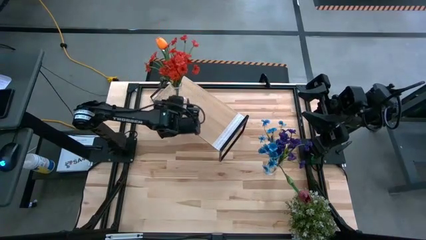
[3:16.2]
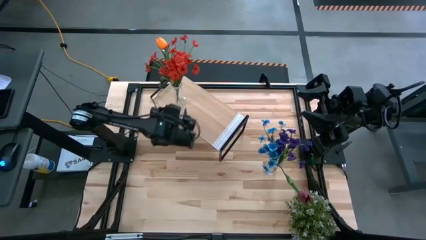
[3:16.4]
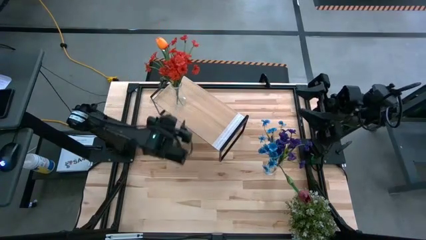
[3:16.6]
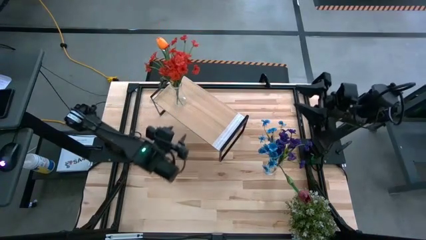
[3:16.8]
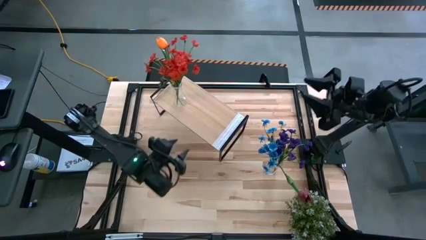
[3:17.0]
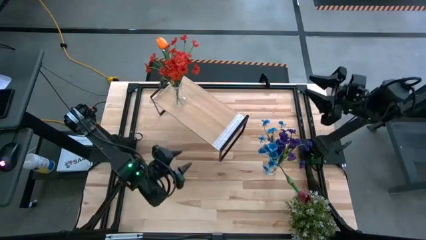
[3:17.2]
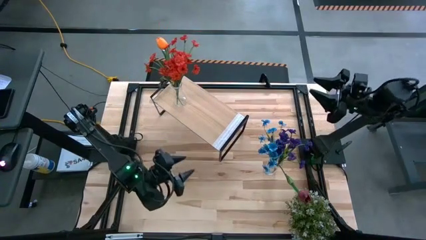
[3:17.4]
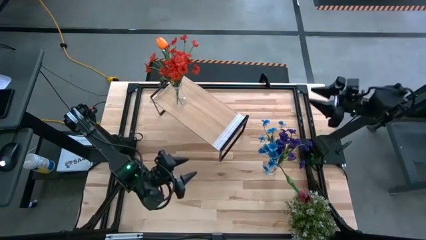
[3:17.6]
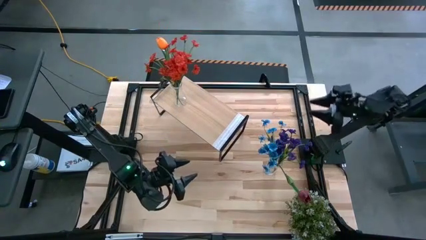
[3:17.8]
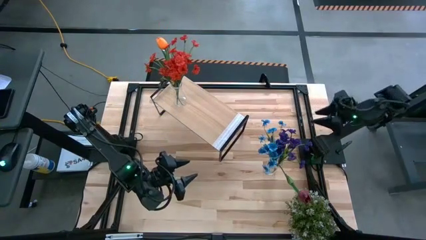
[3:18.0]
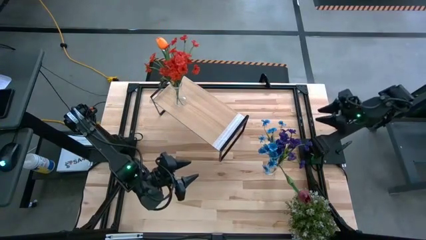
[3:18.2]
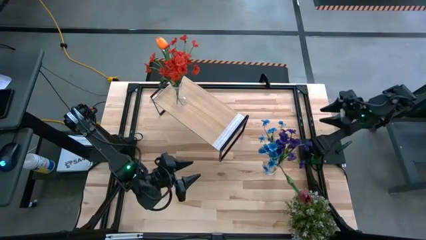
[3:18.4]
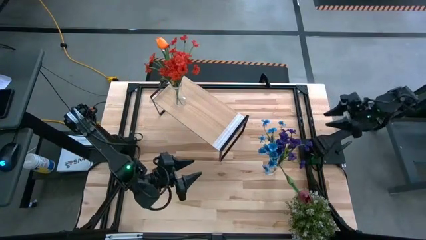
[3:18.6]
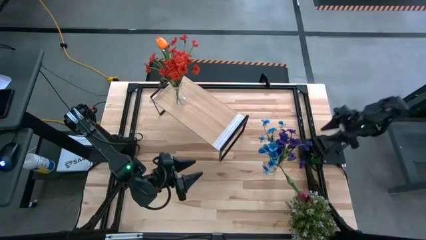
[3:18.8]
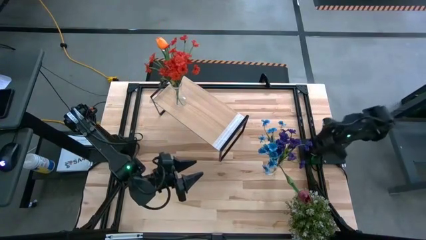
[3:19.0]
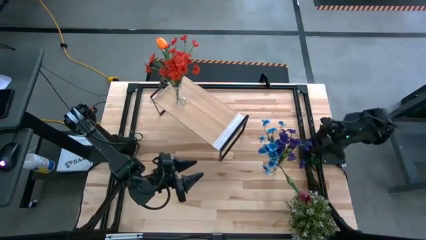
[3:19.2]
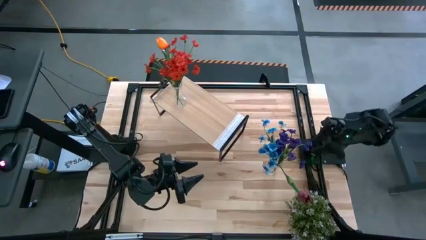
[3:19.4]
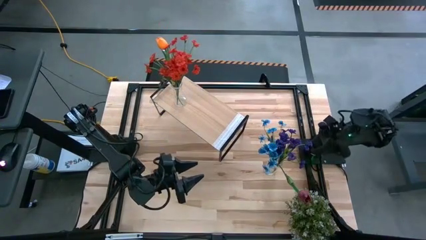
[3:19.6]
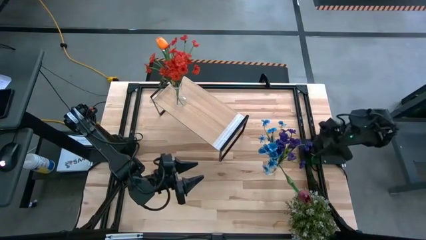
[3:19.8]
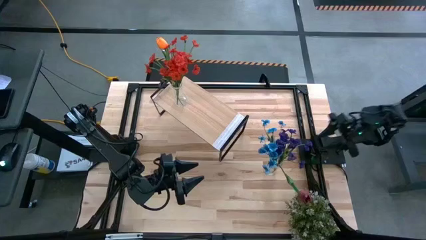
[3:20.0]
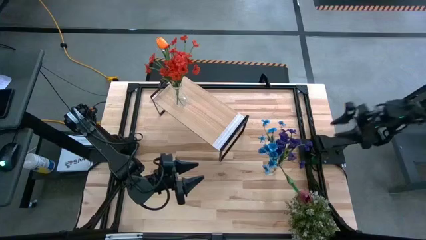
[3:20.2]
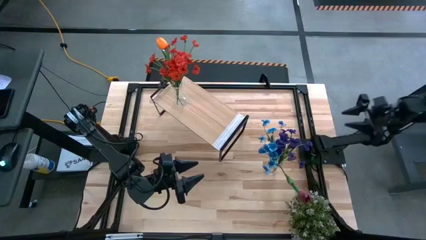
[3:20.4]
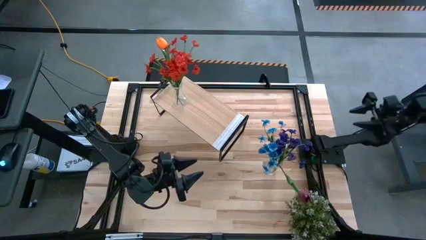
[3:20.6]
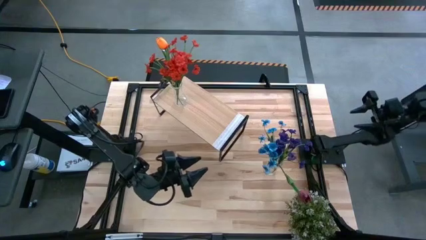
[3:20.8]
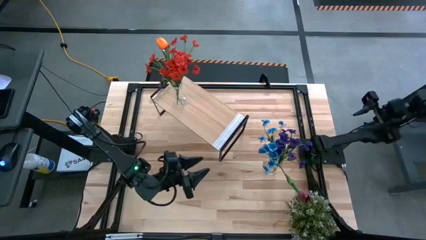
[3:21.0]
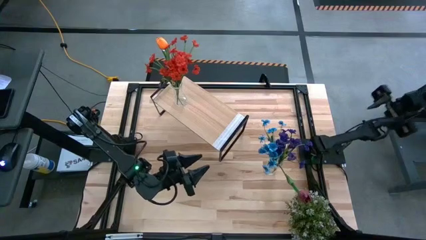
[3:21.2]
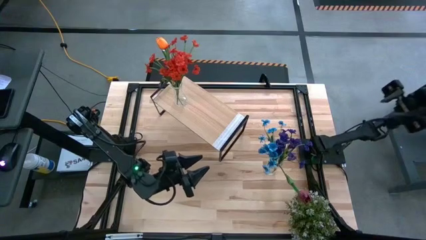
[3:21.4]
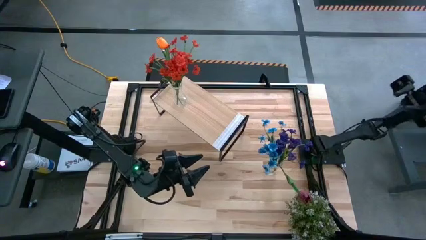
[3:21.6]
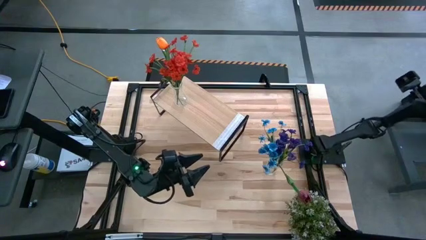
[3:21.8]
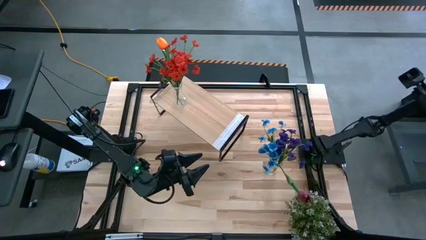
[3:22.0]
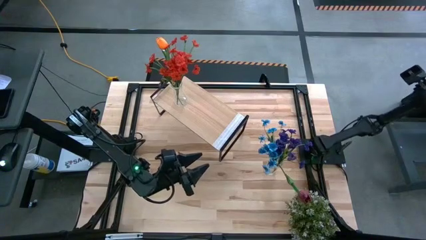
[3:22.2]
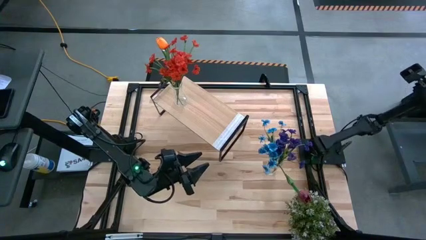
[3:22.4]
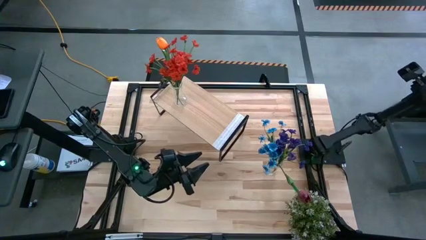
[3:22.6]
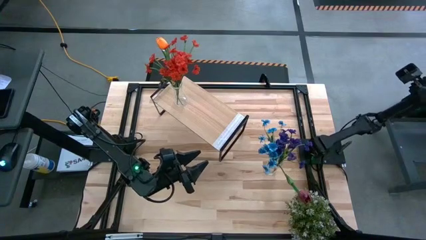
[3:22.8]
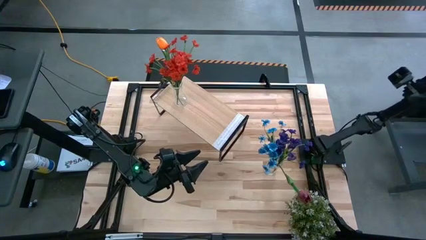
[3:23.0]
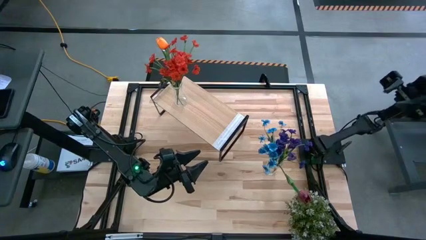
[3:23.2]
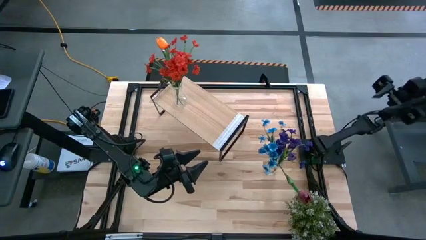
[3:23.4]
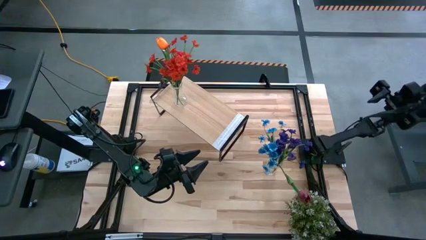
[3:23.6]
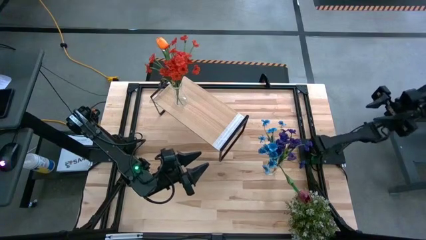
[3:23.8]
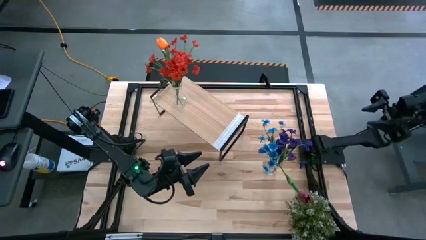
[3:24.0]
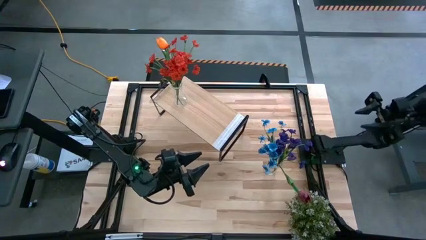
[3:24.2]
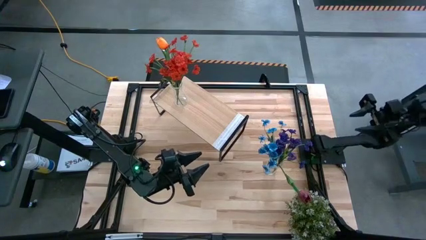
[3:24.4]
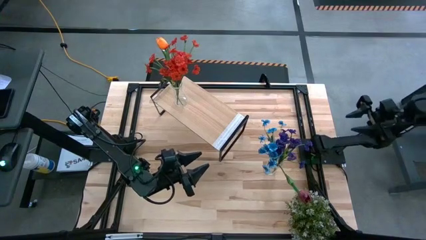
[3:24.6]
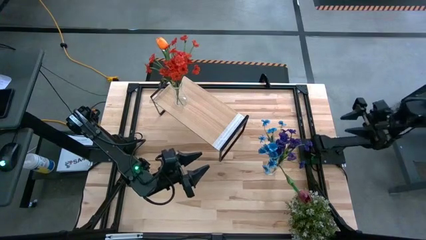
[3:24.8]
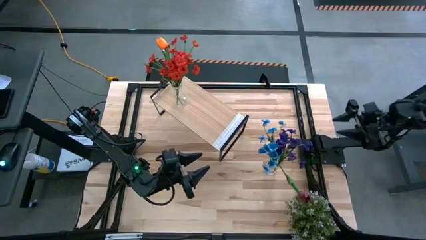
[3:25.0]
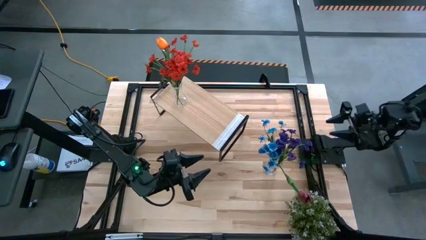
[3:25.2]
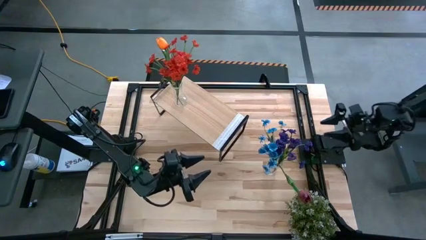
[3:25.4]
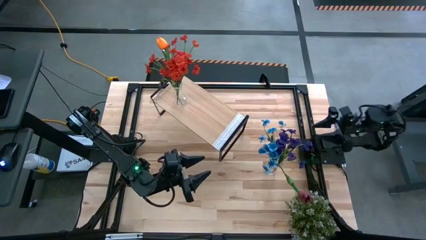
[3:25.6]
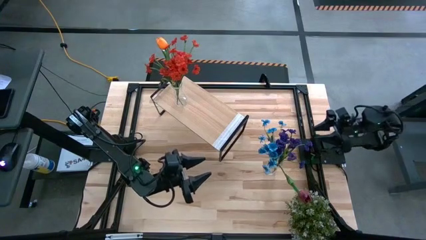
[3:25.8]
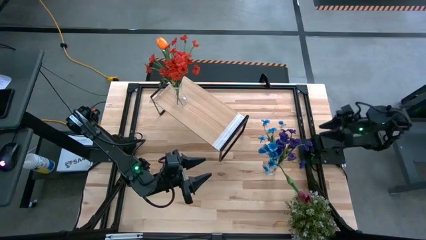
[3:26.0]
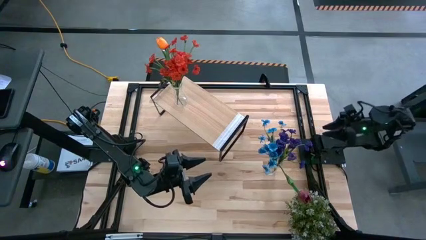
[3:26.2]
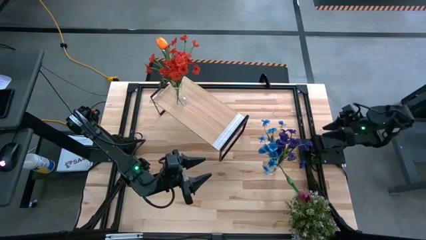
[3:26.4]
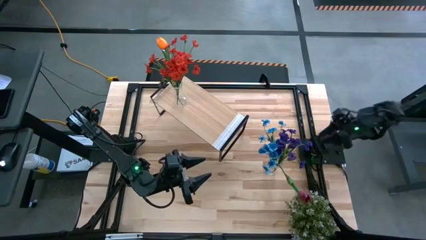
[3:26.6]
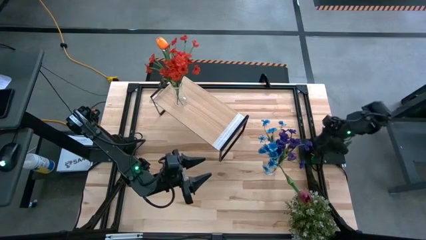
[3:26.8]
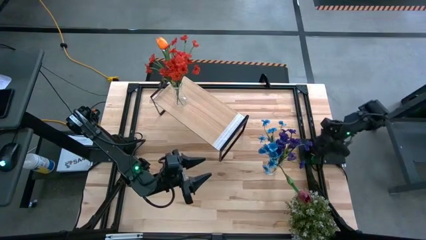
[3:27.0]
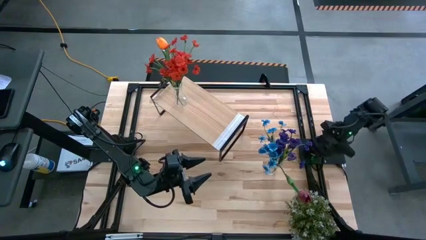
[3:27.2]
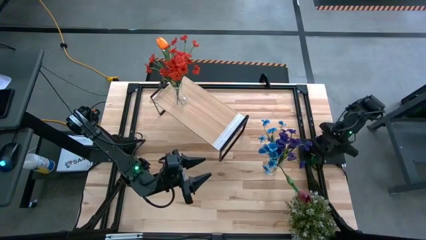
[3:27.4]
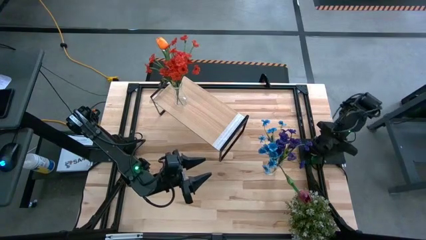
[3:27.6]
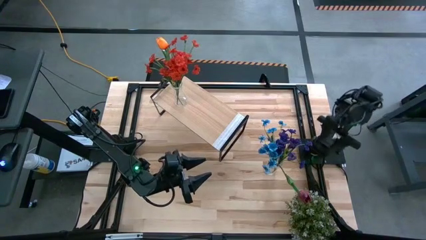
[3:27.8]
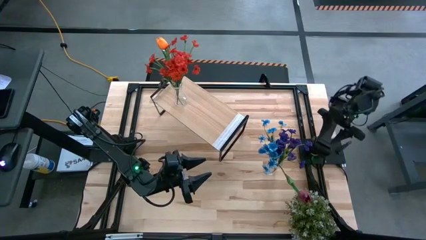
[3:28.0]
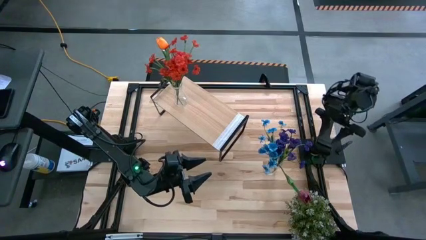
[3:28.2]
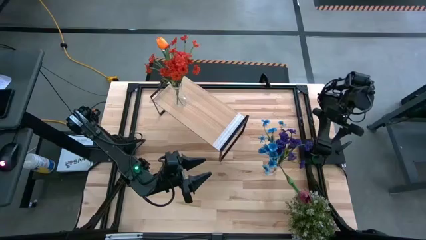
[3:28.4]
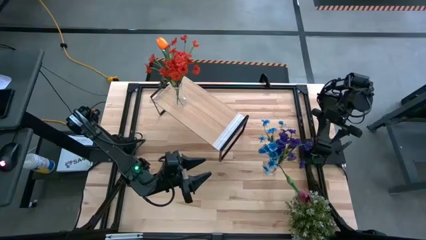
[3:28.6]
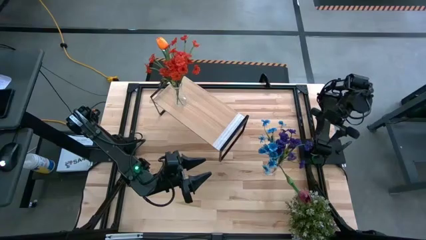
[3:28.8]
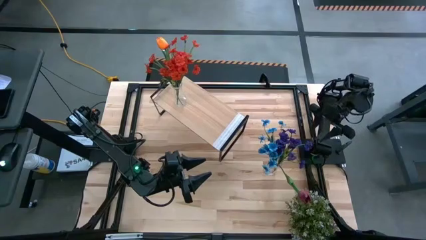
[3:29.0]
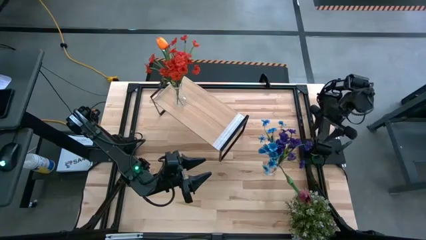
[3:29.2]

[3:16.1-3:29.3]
Task: Pick and place flowers into a vace then onto a shelf
Put the transparent vase on the shelf

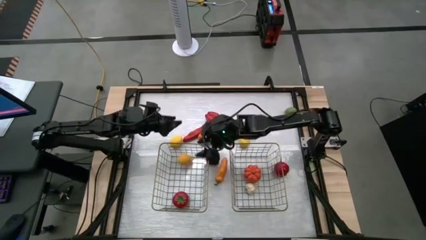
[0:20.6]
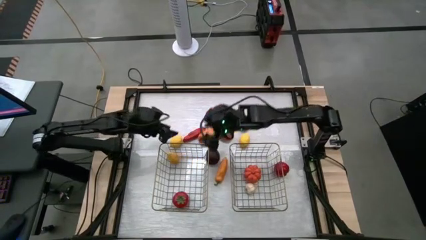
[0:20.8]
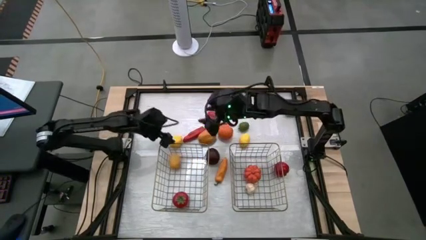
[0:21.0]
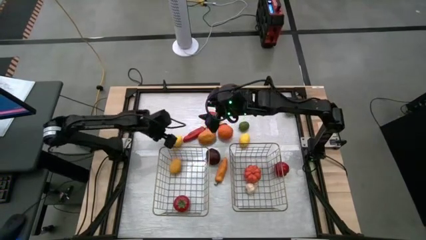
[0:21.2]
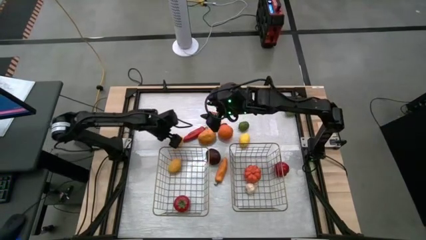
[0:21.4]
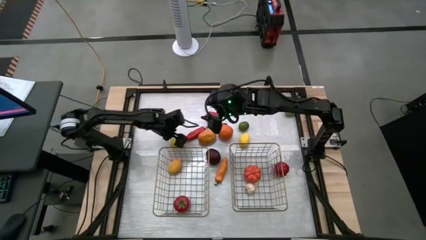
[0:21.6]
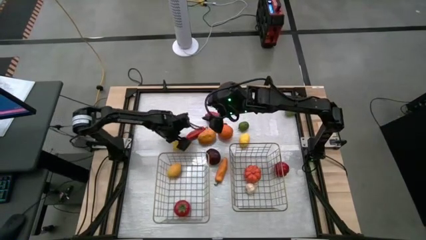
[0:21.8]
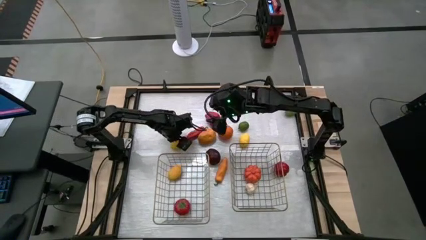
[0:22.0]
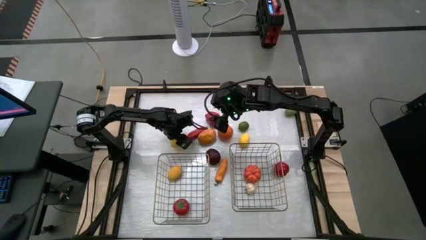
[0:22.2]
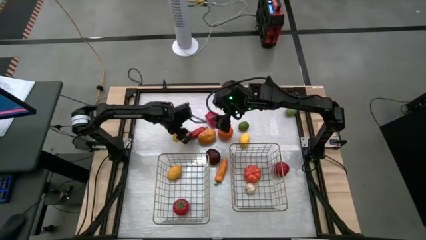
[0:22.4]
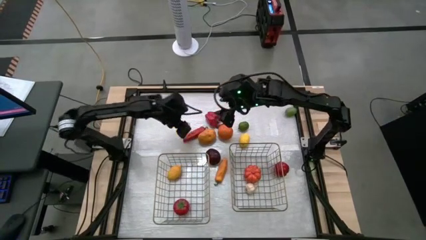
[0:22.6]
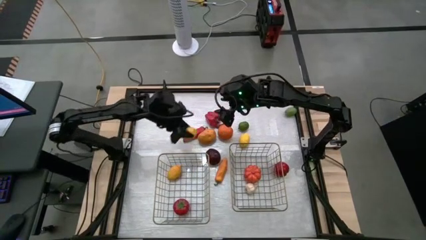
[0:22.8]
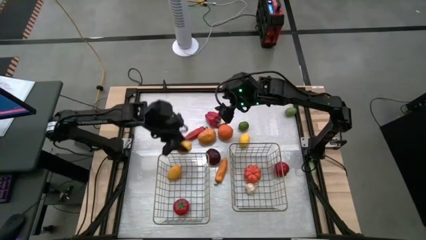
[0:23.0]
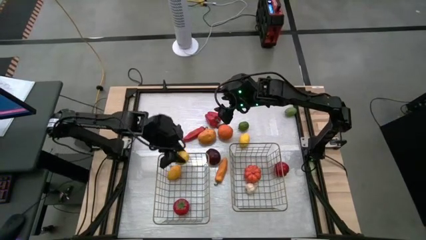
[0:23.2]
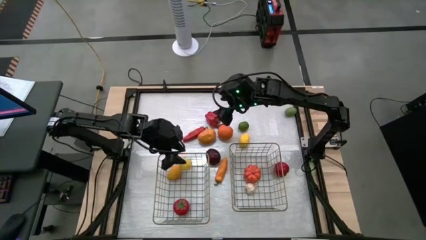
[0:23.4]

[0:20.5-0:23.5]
Task: Sort produce into baskets
Put the left lemon into the left wire brown basket
